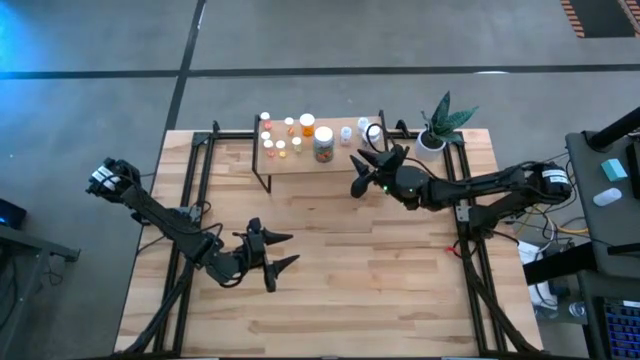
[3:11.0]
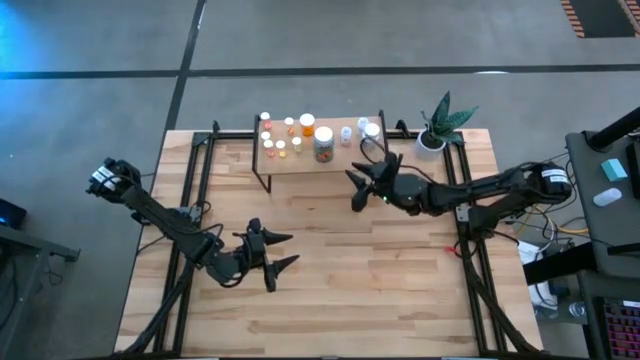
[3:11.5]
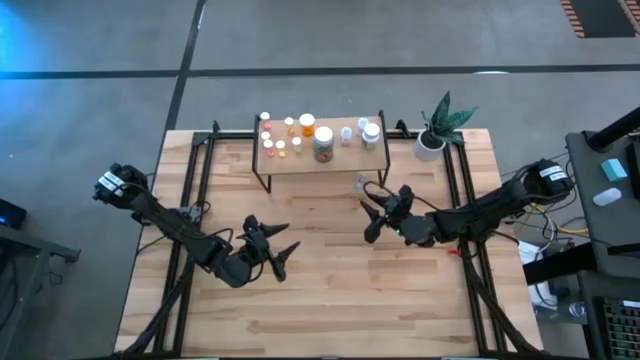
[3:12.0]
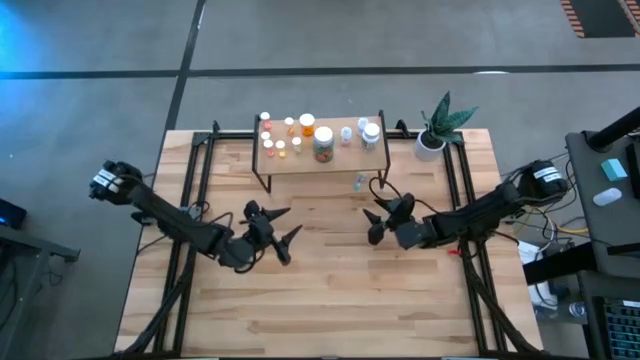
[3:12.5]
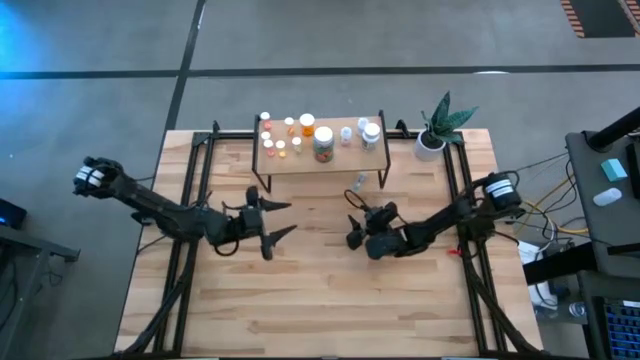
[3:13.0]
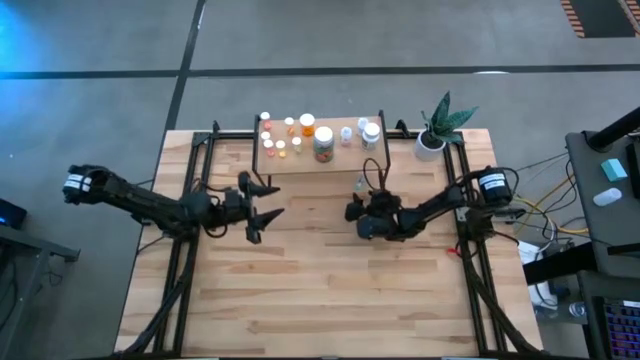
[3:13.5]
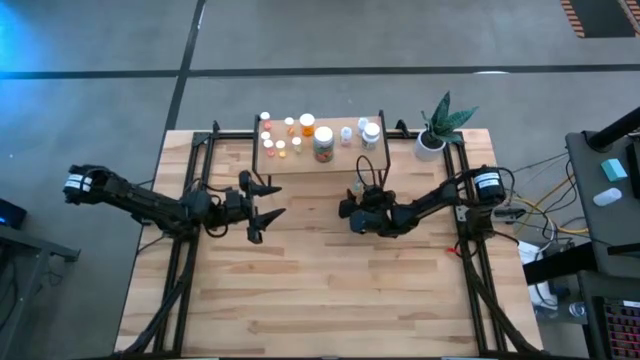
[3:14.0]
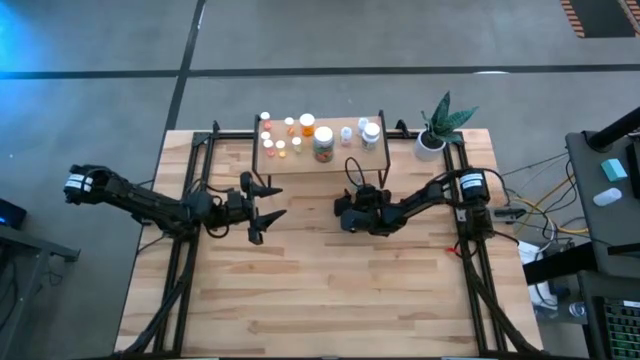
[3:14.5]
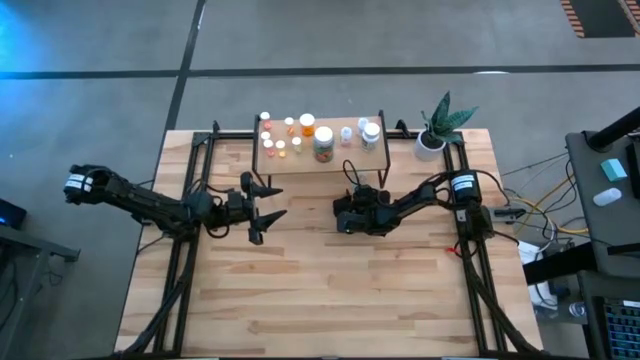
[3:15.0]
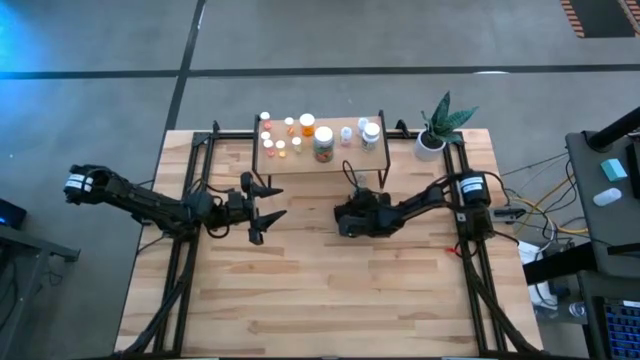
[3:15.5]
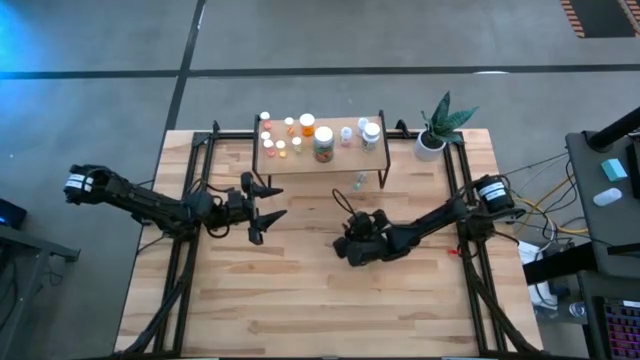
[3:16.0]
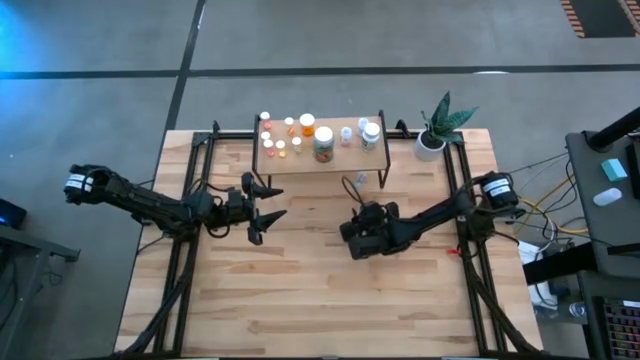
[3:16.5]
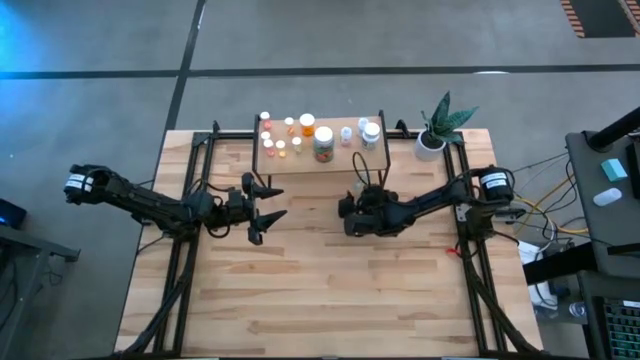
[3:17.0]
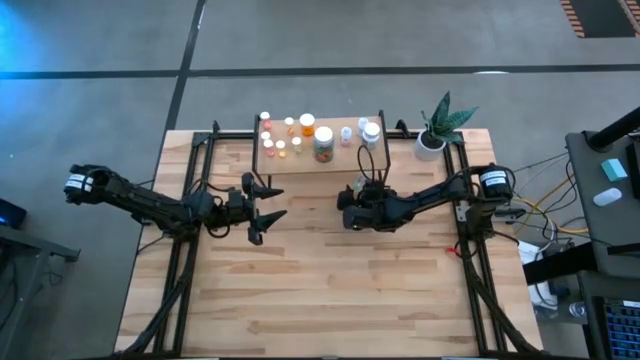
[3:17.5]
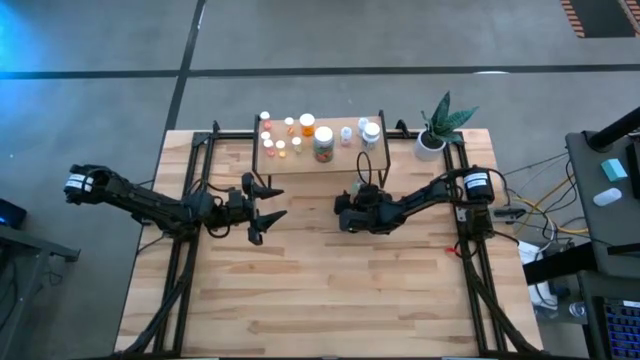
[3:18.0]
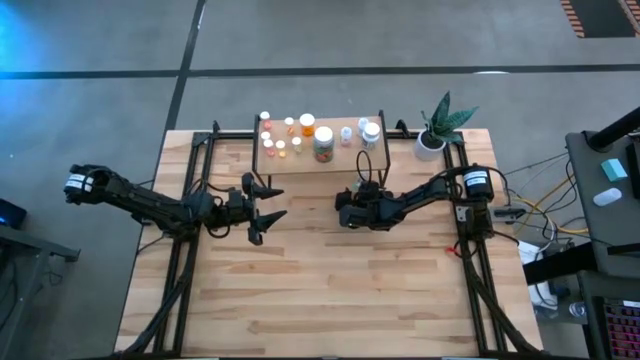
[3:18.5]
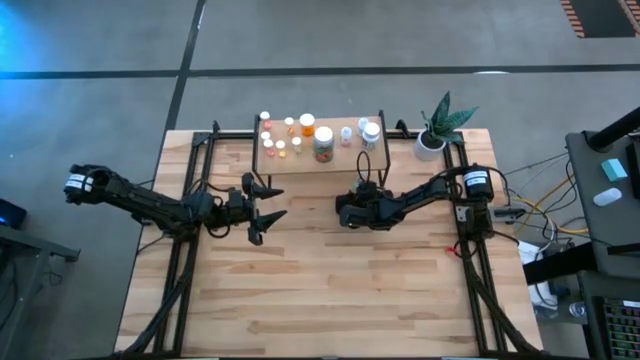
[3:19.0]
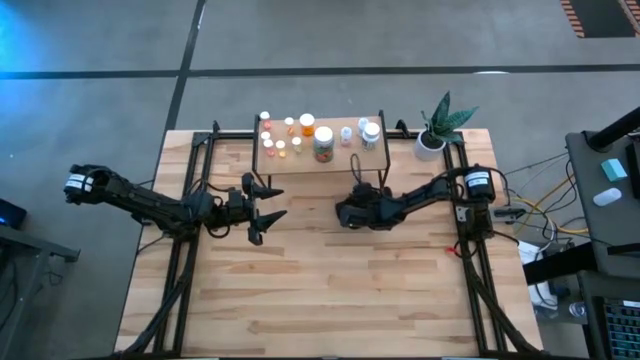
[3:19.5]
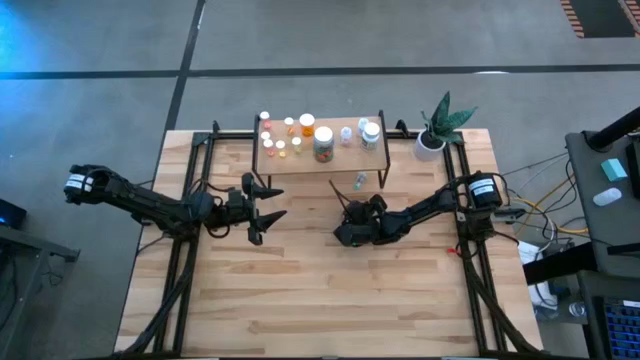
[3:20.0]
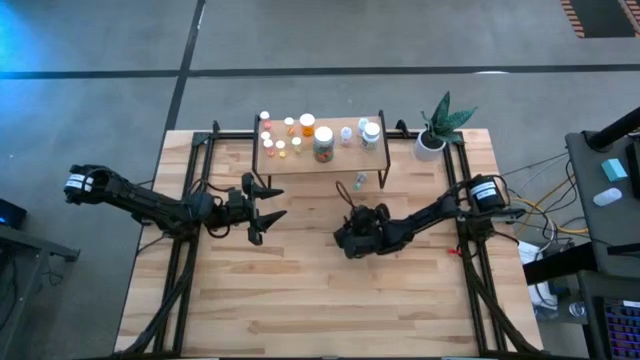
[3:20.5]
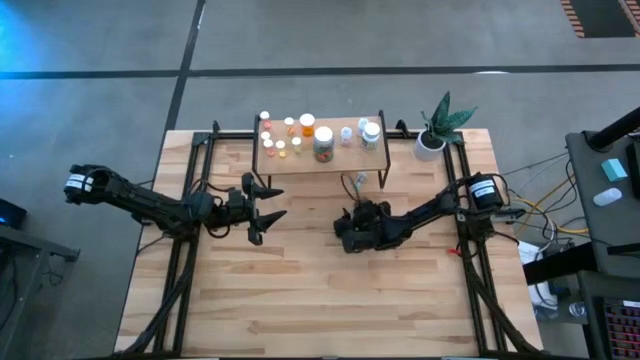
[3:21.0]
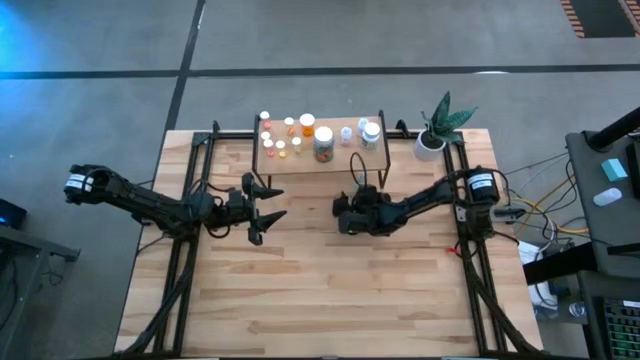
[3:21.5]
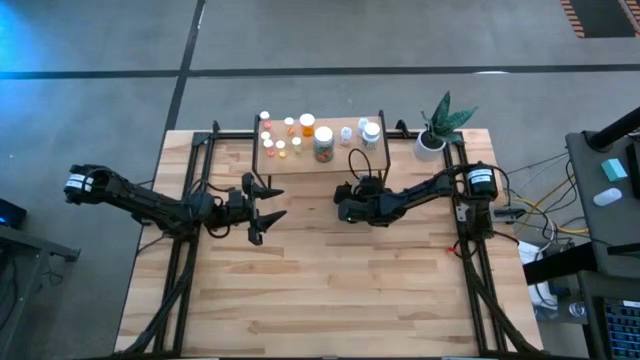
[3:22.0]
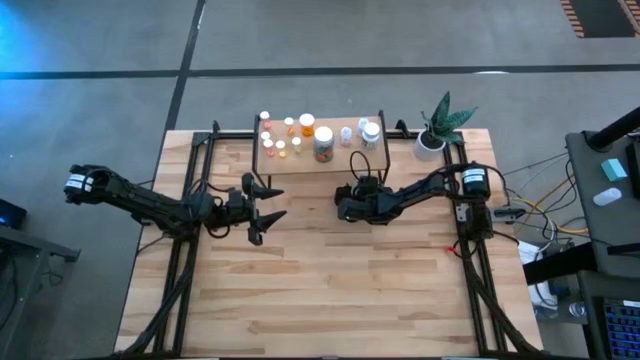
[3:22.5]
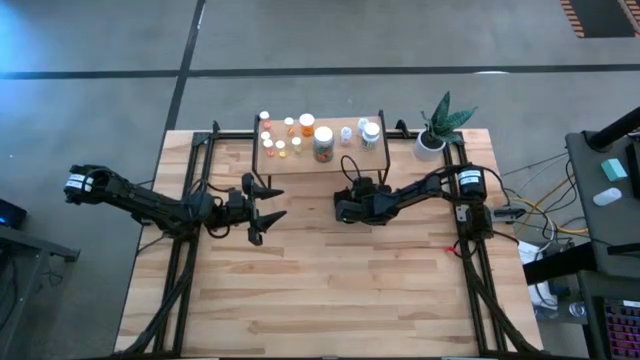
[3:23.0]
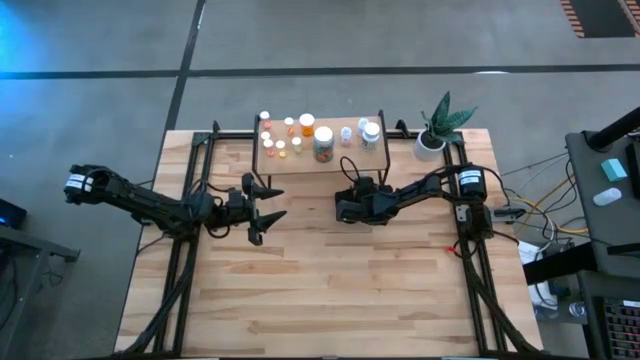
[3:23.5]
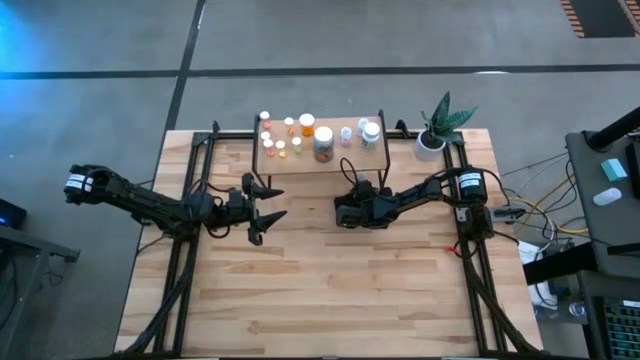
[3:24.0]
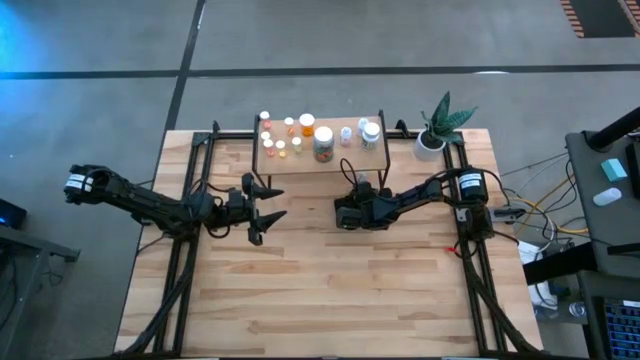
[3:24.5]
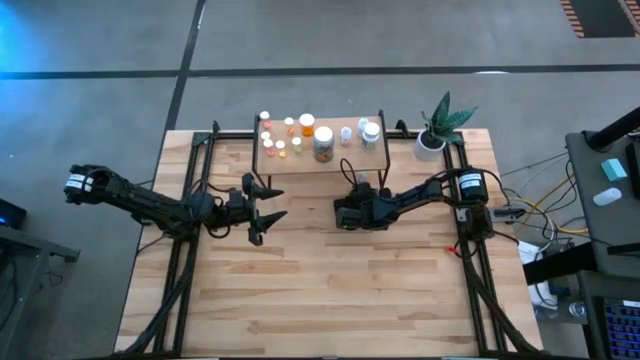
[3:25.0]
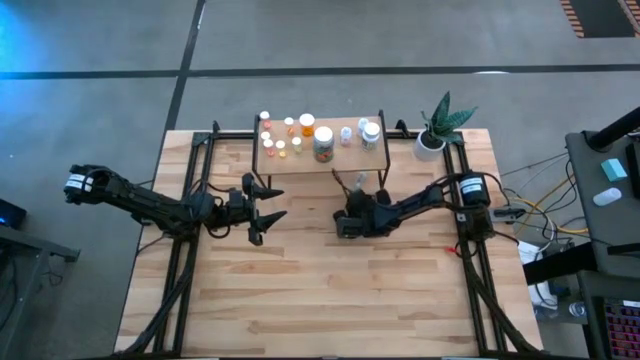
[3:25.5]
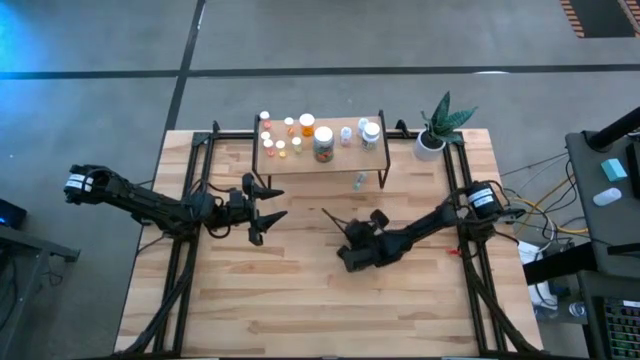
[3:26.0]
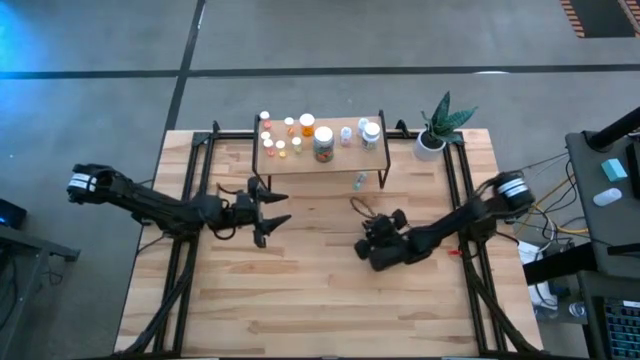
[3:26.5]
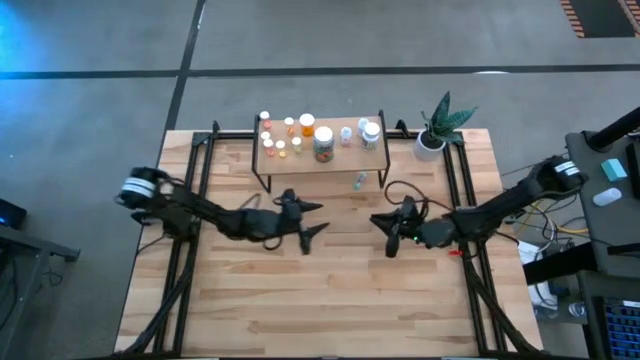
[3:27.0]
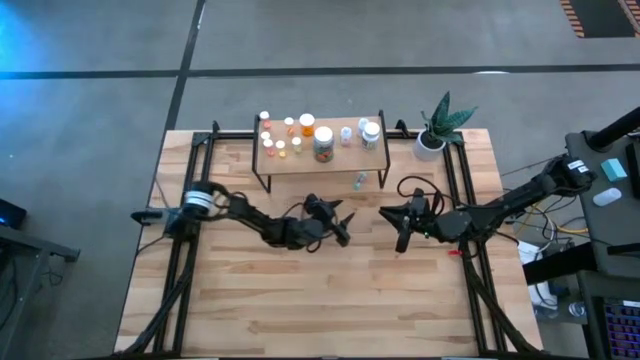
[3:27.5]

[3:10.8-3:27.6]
Task: Pick and place medicine bottles onto shelf by color
Put the blue pill bottle on the shelf
